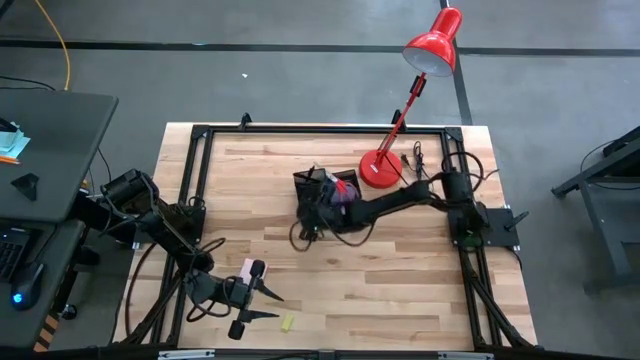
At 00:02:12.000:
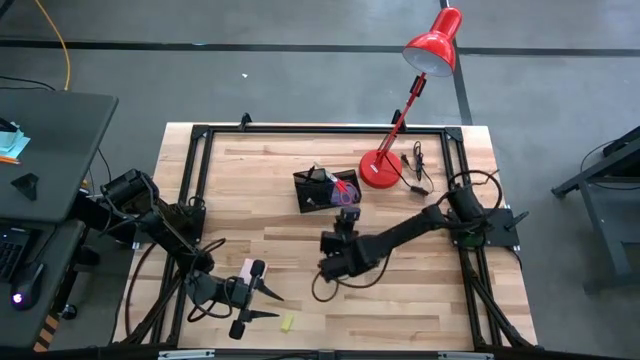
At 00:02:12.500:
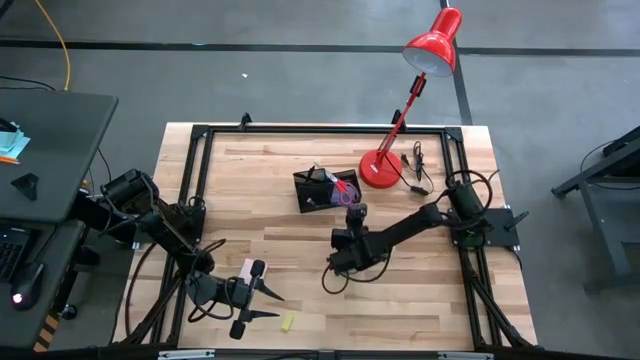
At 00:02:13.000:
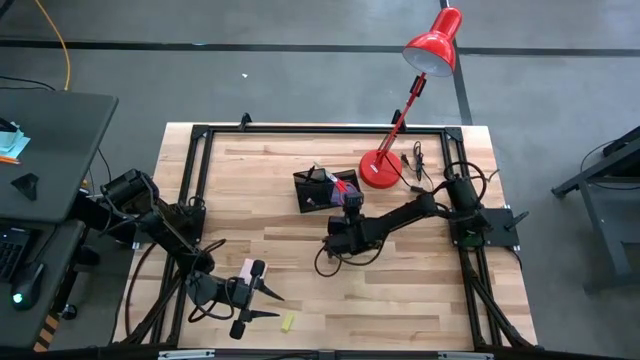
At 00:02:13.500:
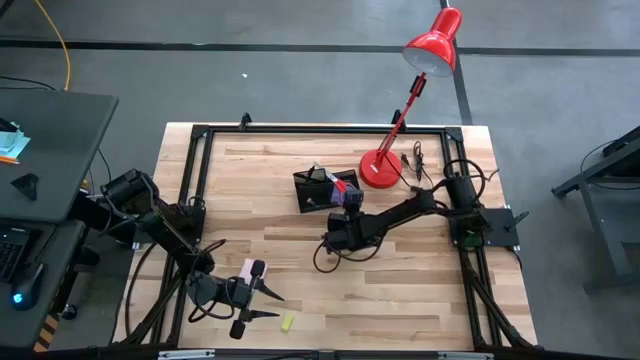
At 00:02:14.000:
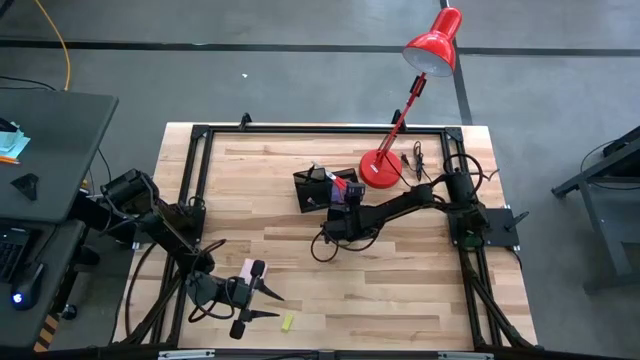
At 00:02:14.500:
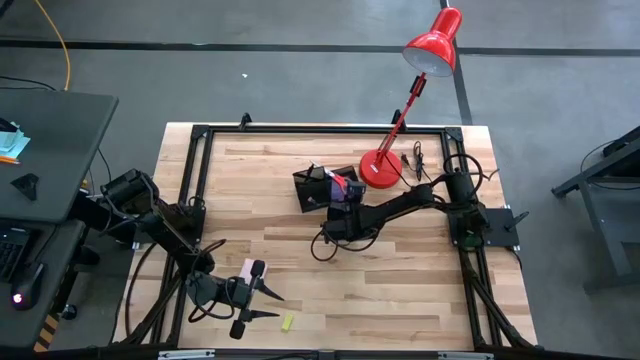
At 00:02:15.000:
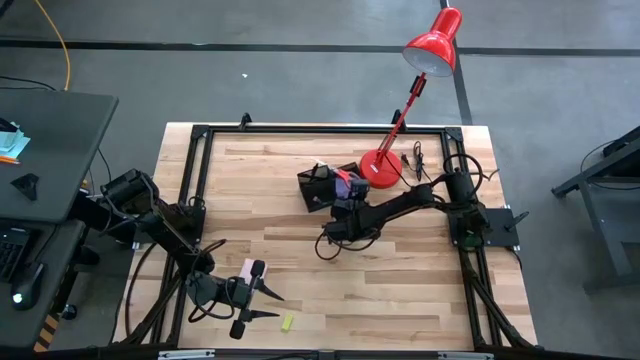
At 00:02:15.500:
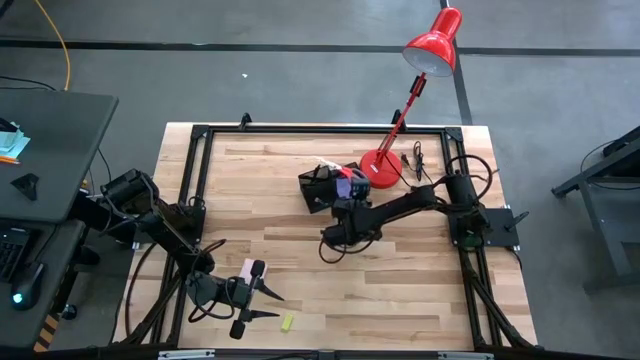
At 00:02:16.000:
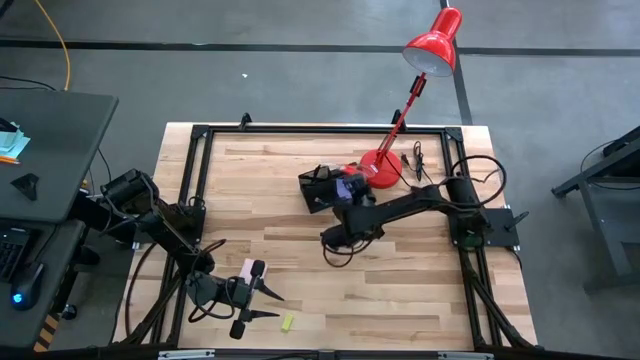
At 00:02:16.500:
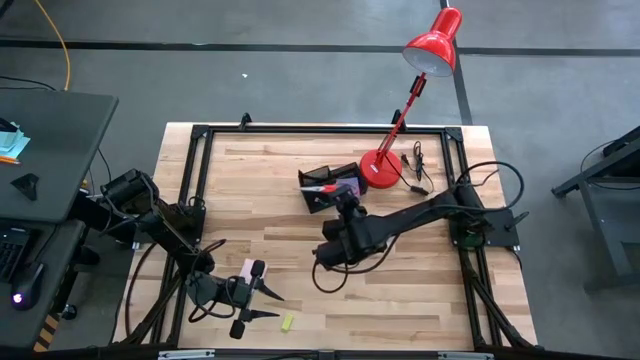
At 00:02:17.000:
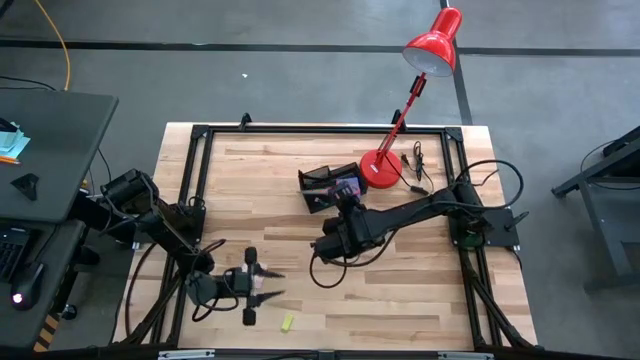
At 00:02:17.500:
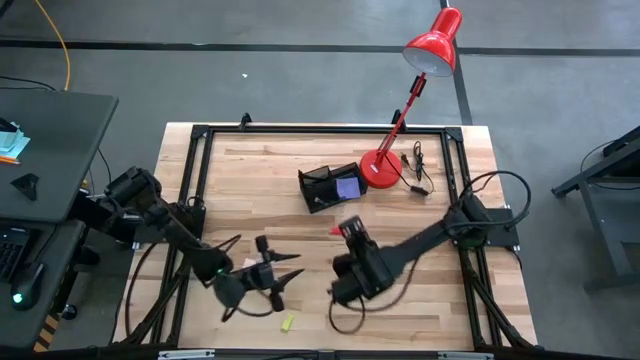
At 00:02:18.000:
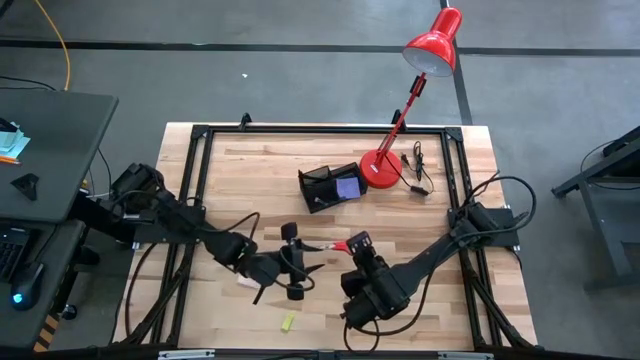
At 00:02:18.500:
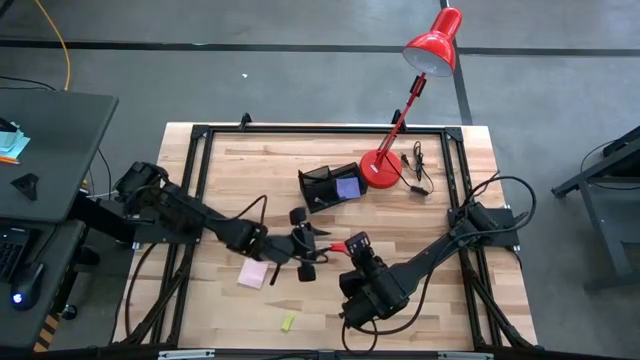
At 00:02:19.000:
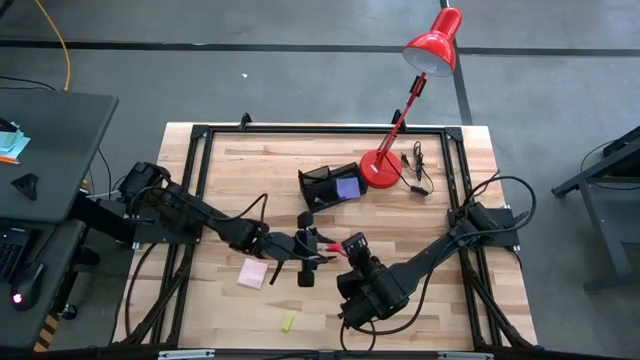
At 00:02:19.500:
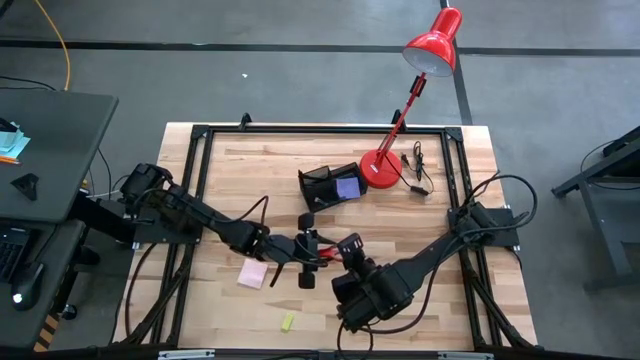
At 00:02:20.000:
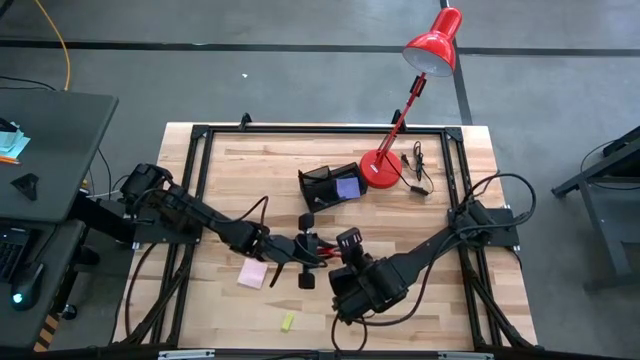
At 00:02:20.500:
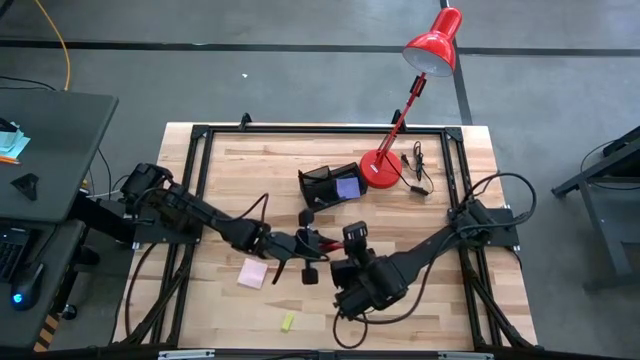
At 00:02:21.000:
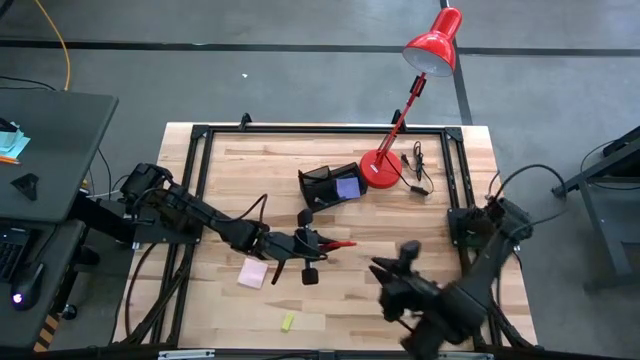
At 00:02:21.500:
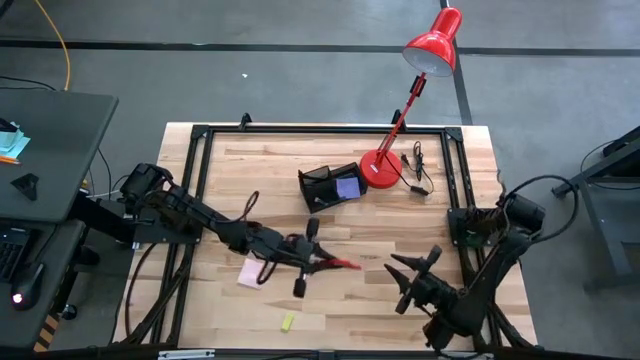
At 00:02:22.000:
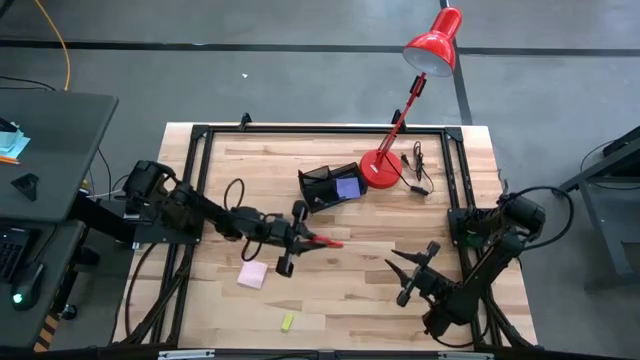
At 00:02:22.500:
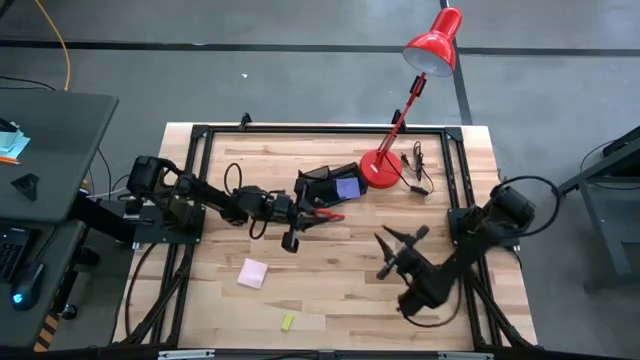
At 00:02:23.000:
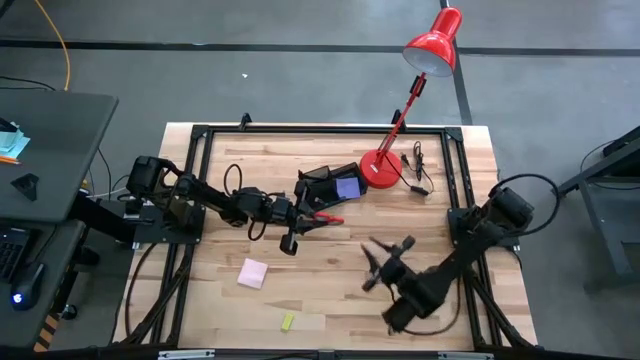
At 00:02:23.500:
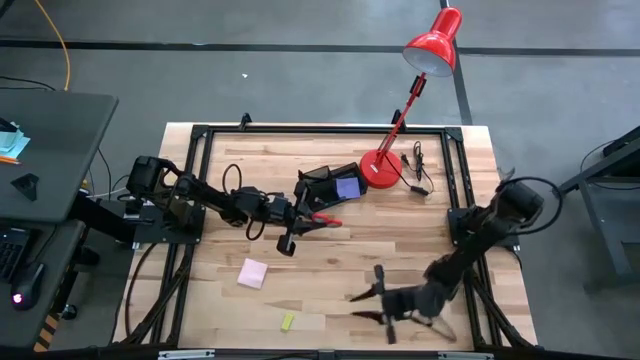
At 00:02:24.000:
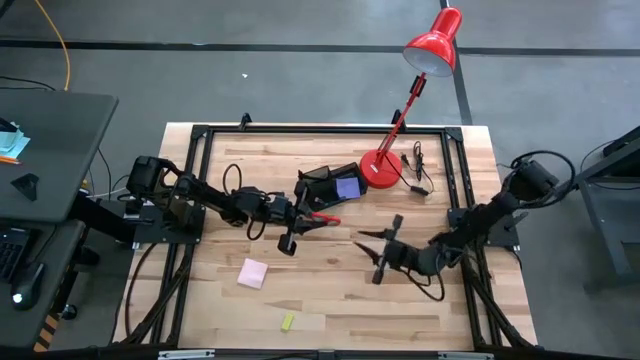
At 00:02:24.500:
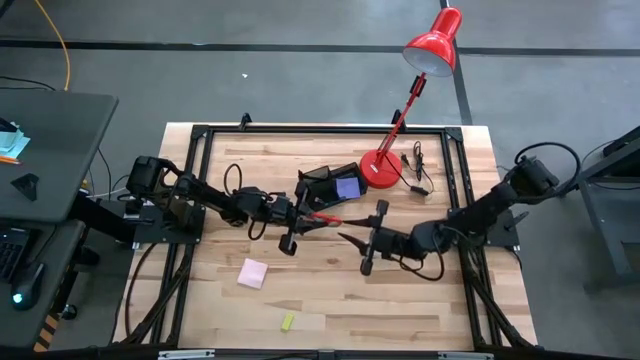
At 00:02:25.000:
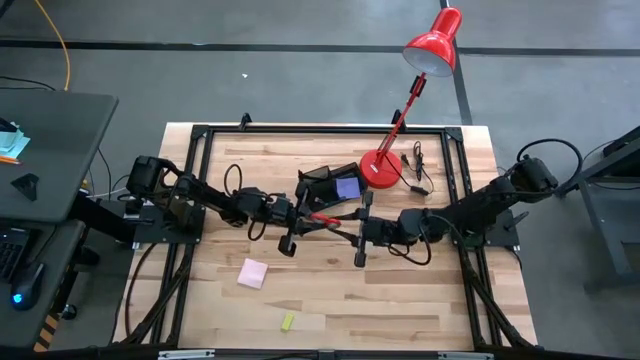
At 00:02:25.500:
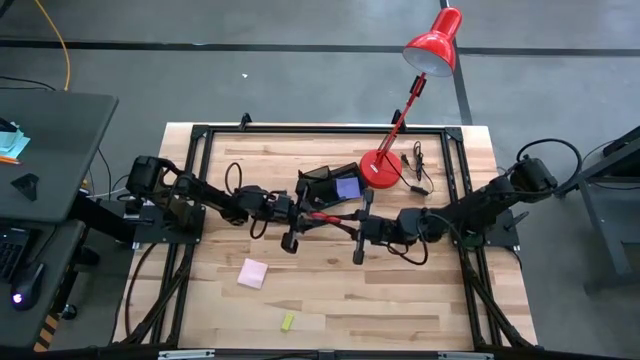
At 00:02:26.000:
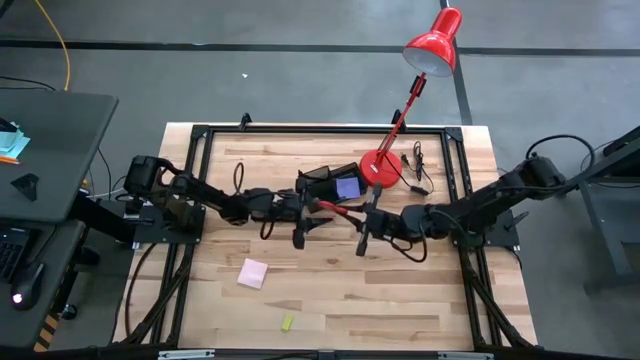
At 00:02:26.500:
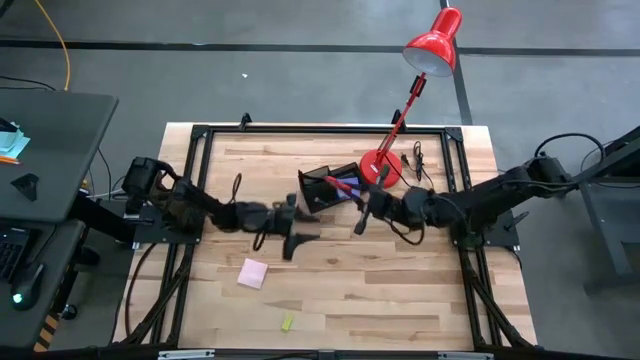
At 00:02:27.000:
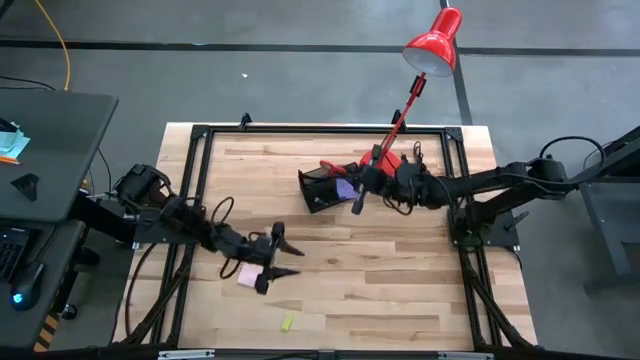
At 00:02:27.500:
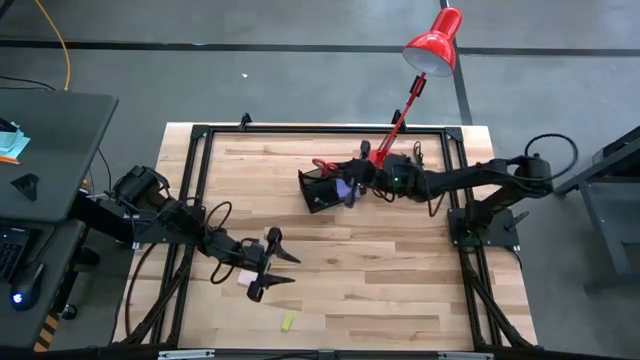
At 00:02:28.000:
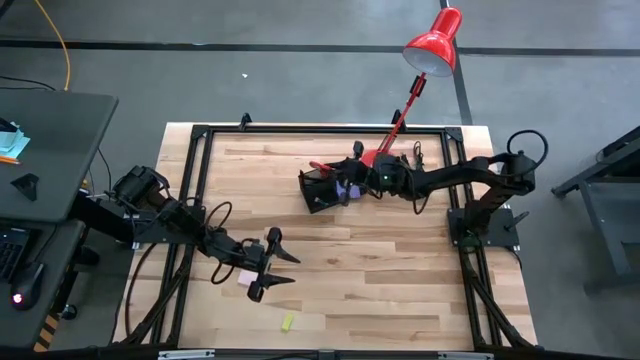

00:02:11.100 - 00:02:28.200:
Task: Pick and place office supplies into organizer
Adjust the red scissors in the black desk organizer

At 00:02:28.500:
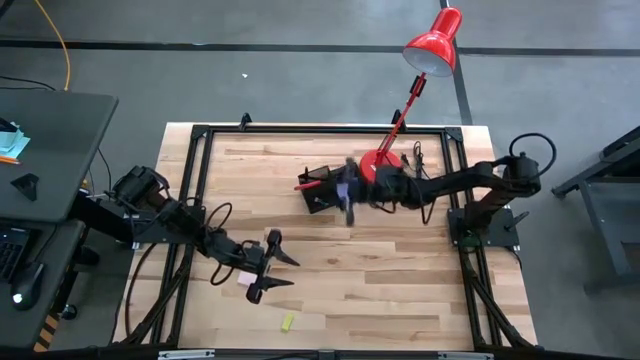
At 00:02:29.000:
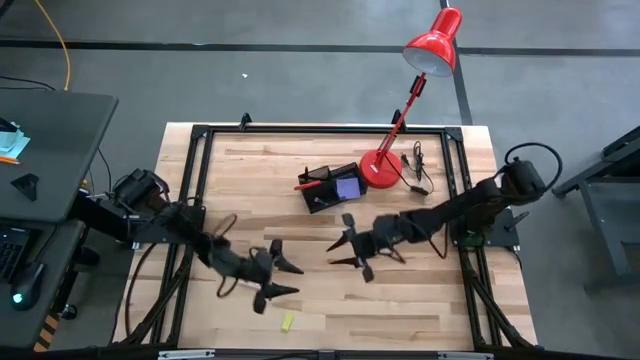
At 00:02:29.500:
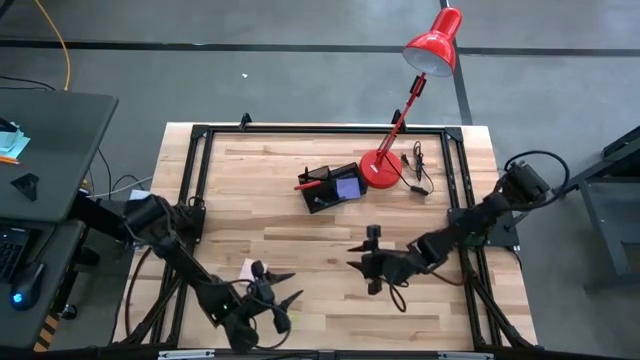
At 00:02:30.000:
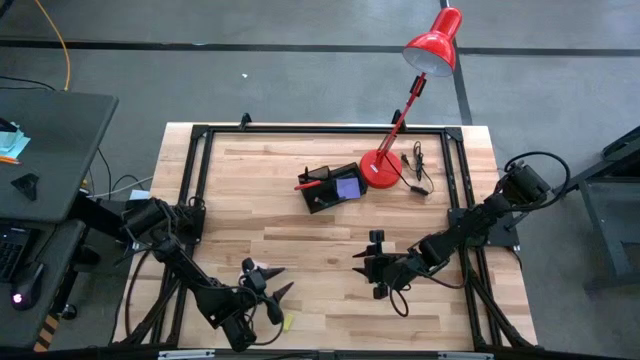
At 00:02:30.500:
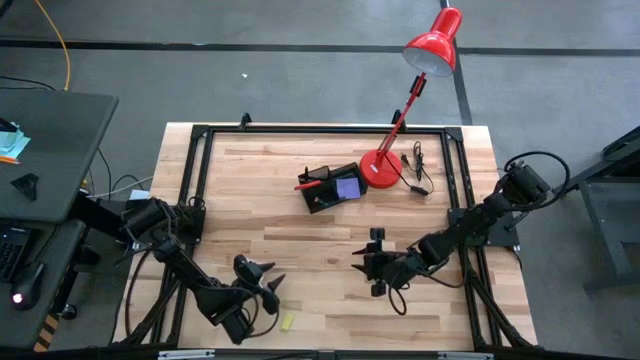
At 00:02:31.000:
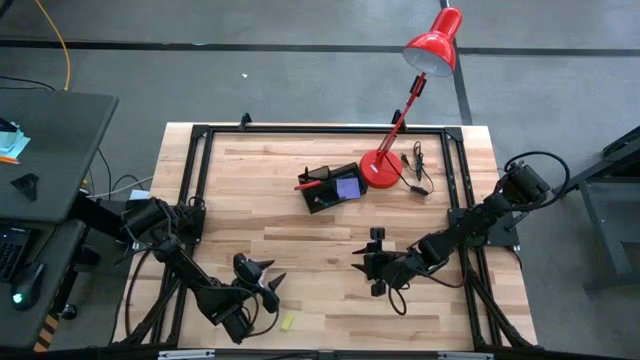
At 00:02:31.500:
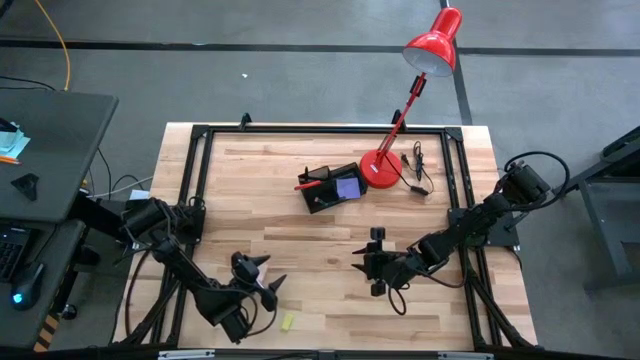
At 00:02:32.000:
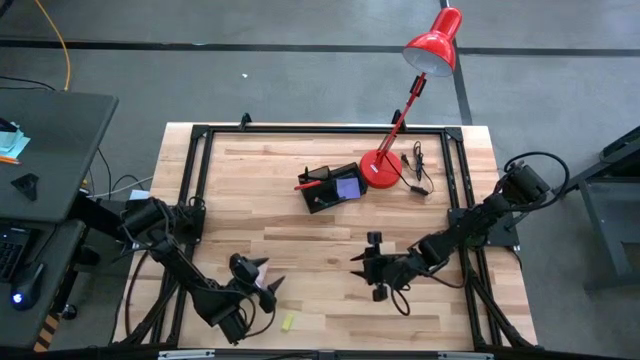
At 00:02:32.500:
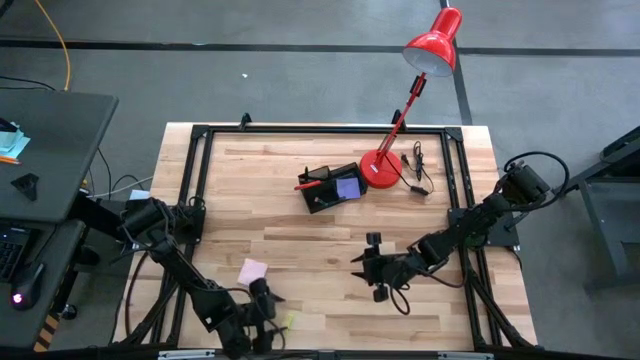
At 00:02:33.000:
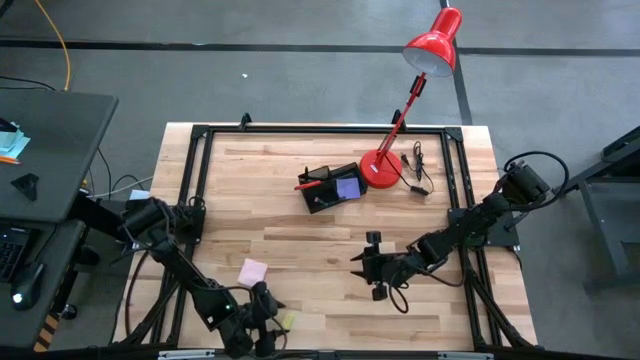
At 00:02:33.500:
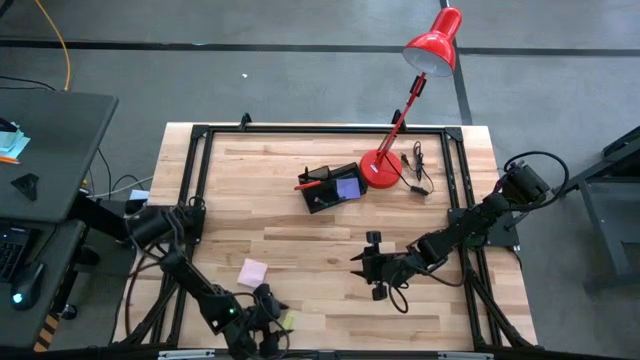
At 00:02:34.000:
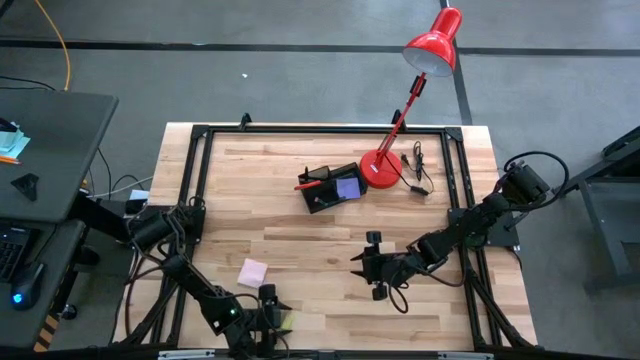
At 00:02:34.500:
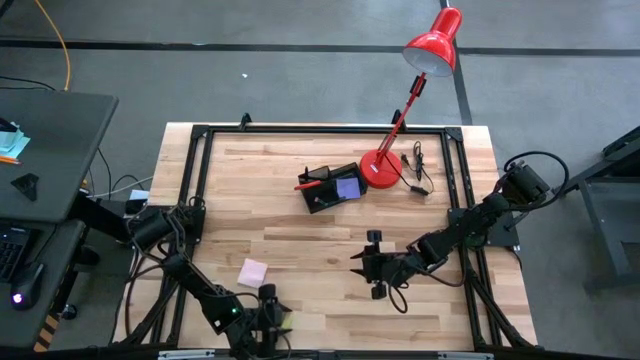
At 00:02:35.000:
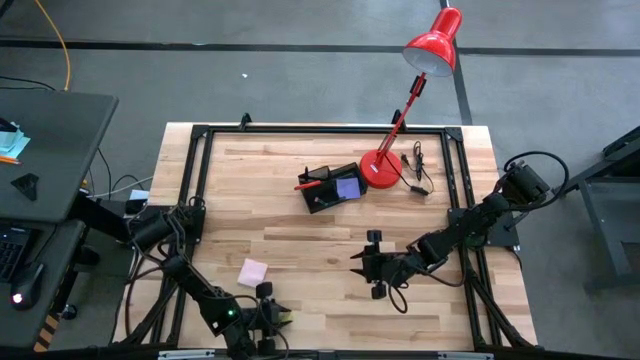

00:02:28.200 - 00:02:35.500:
Put the yellow eraser into the black desk organizer
